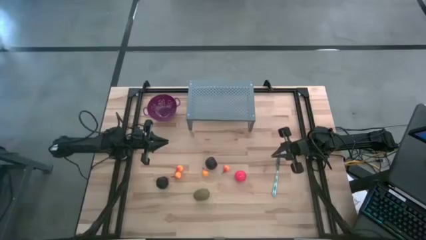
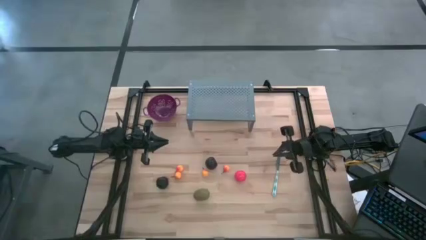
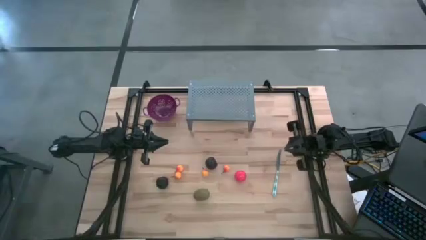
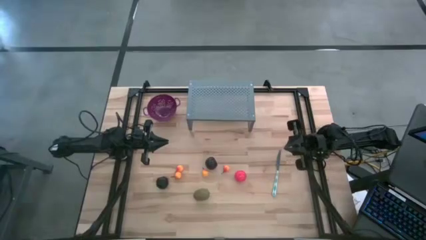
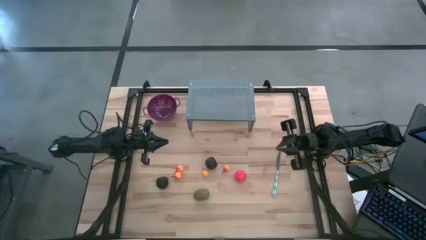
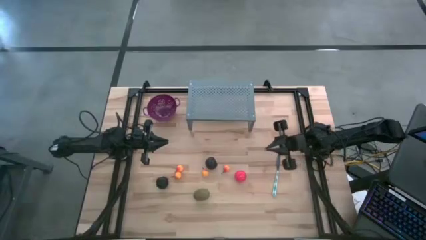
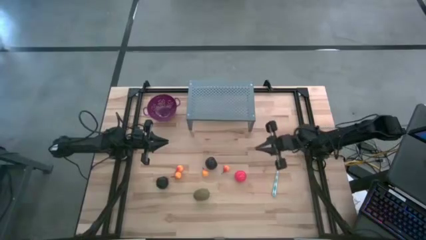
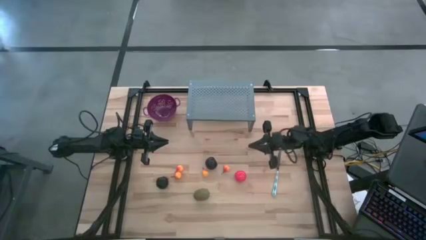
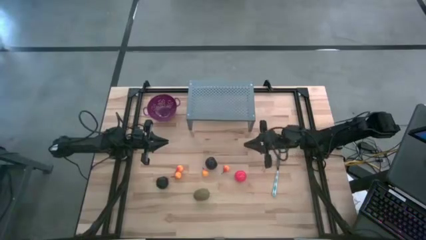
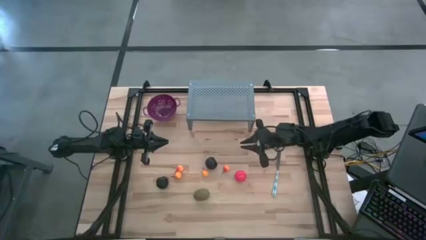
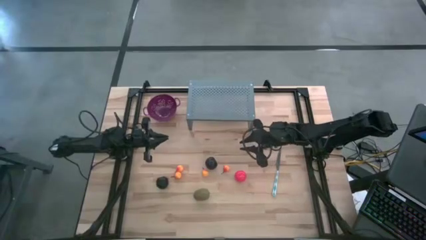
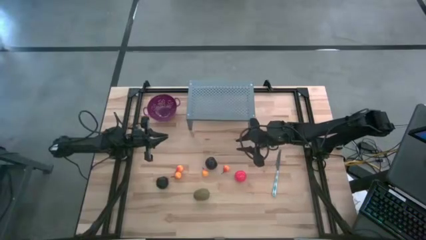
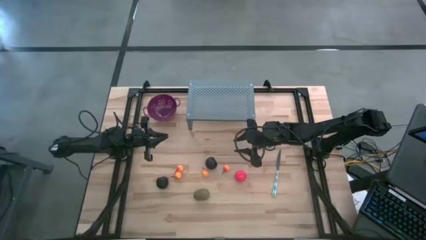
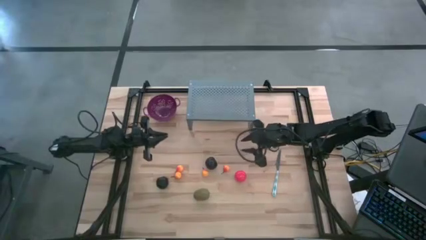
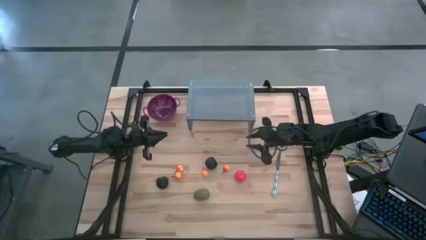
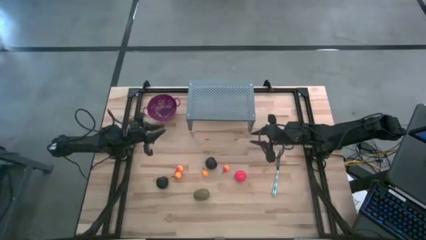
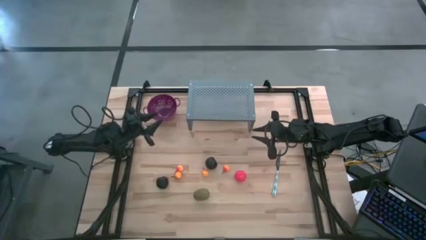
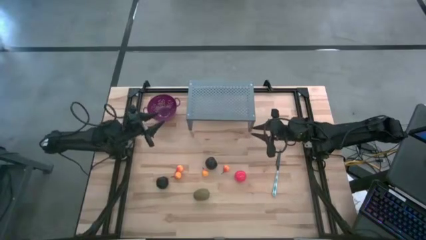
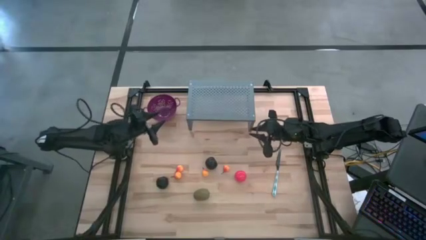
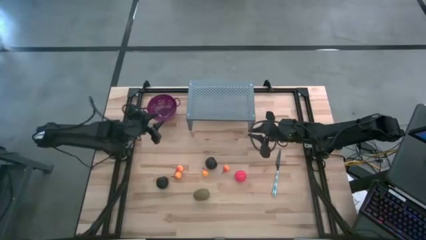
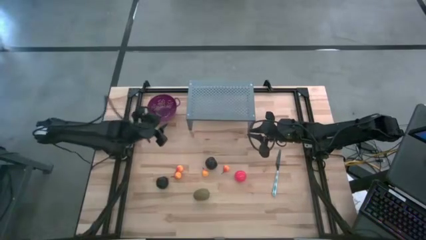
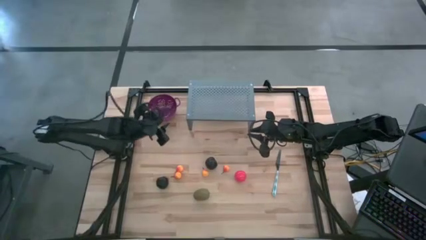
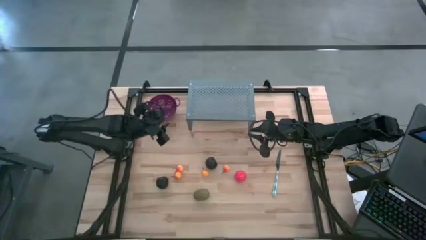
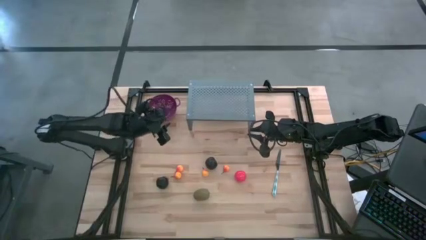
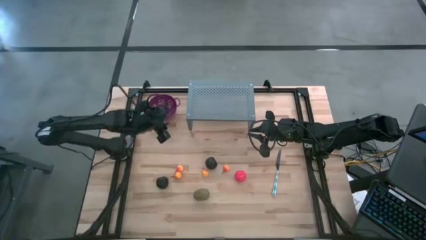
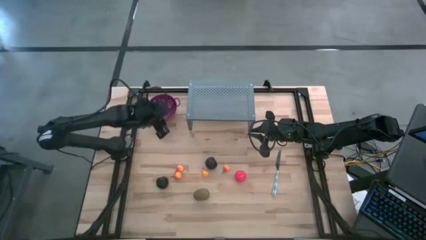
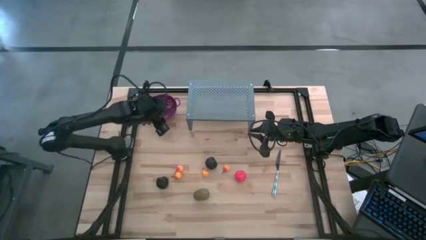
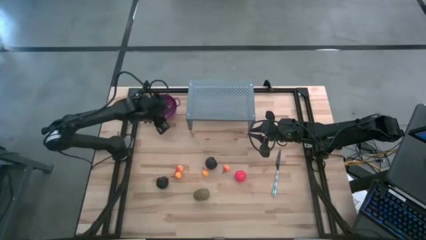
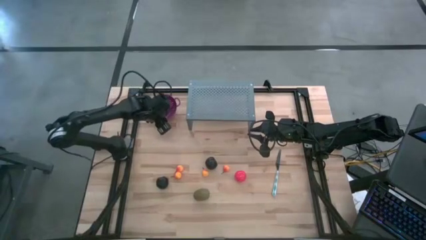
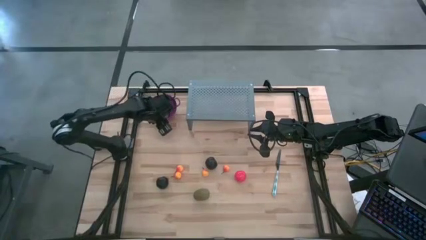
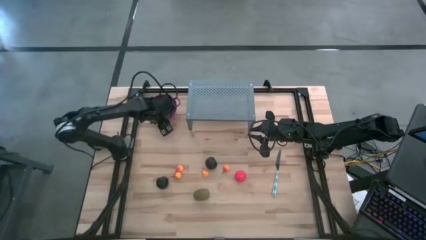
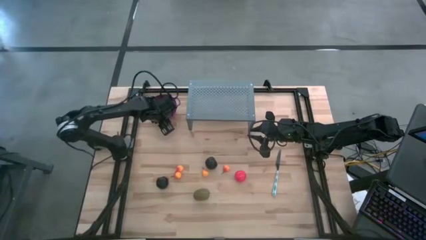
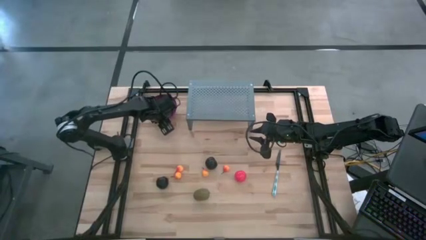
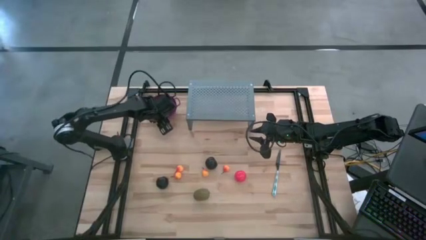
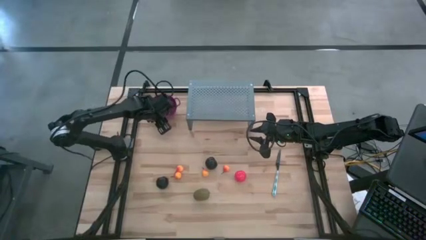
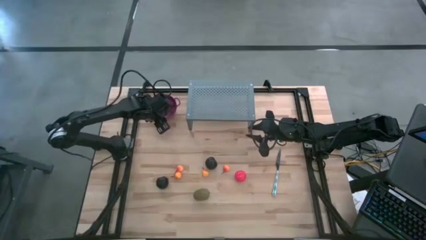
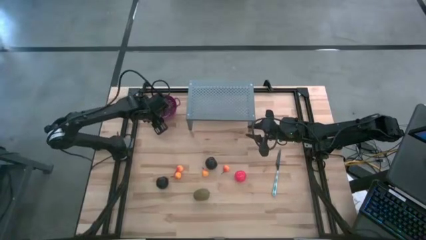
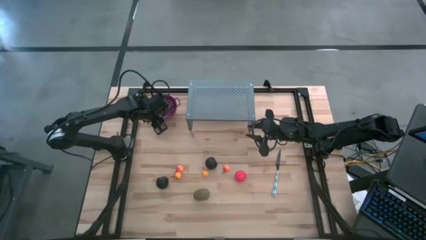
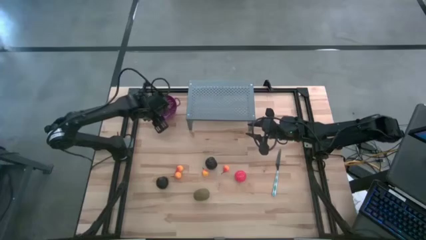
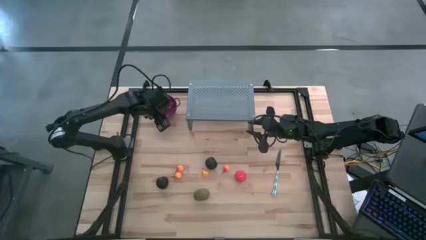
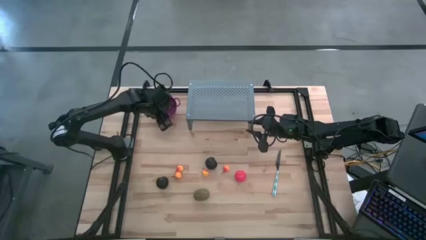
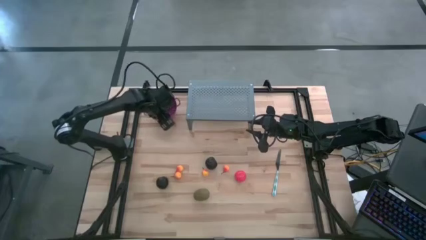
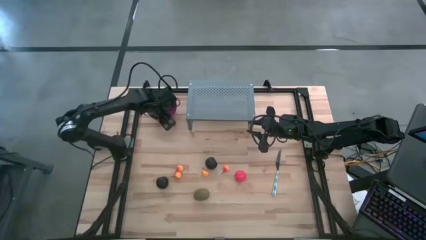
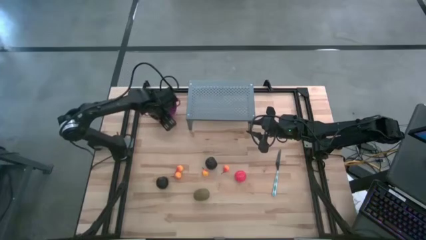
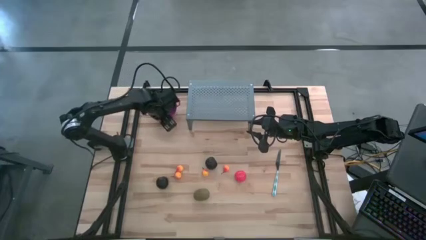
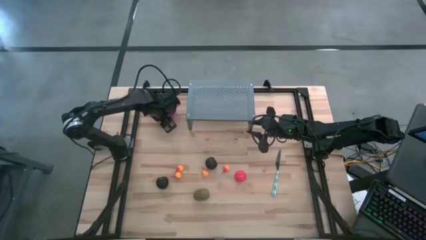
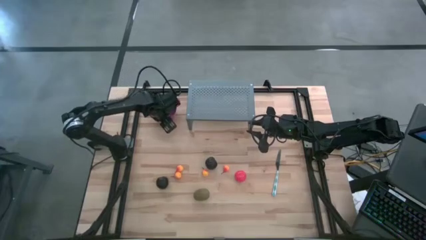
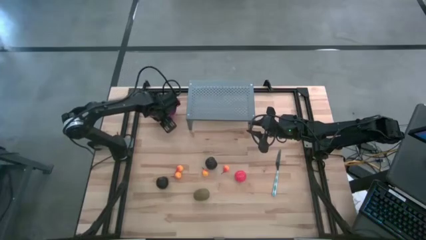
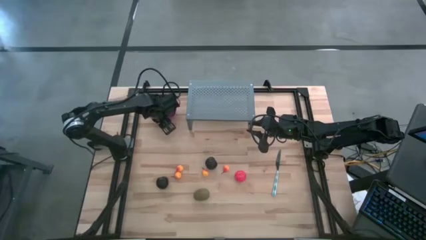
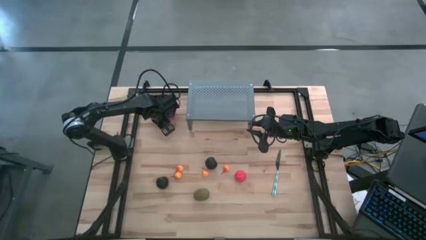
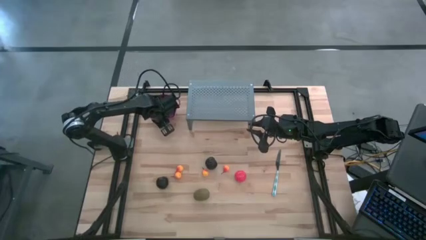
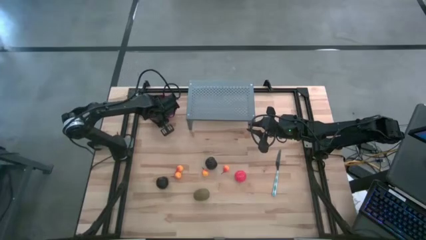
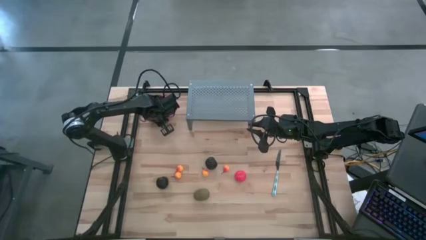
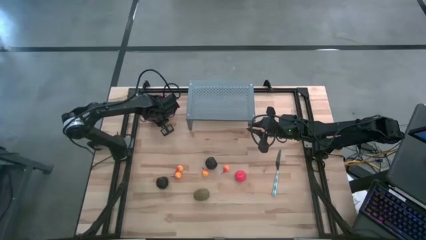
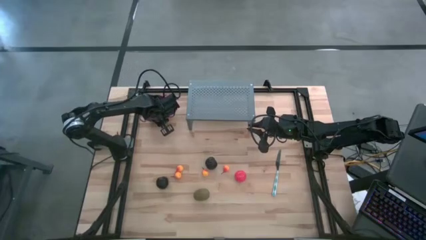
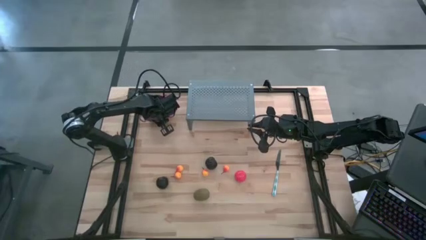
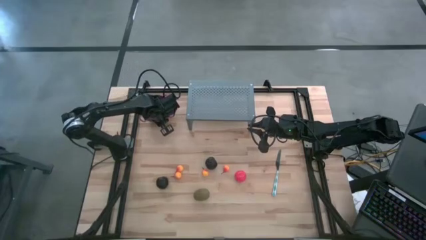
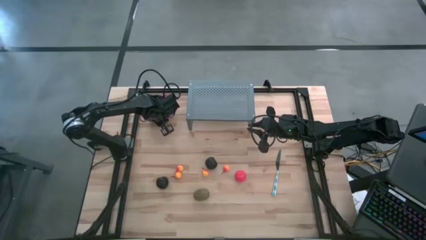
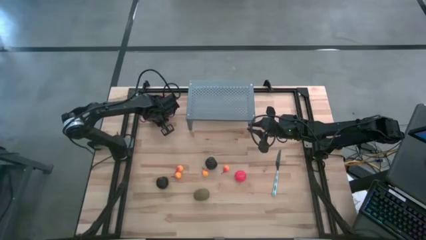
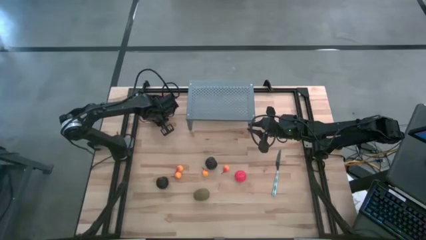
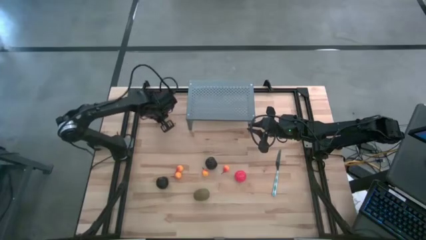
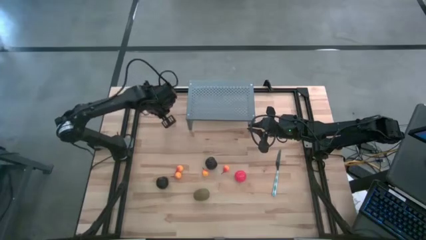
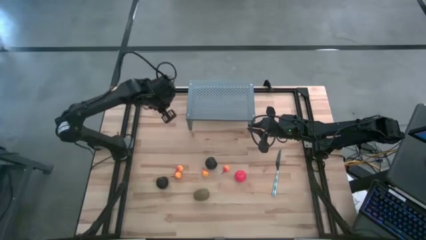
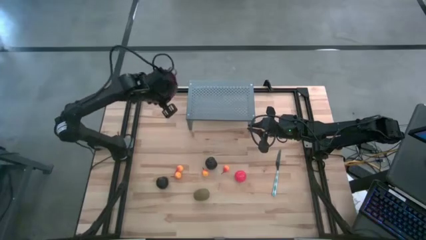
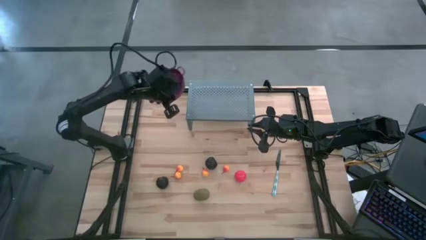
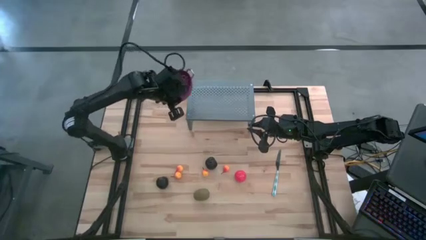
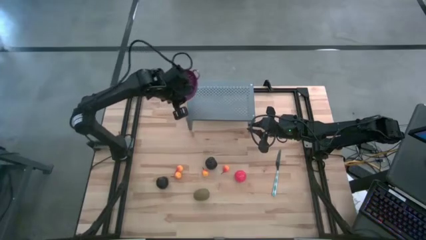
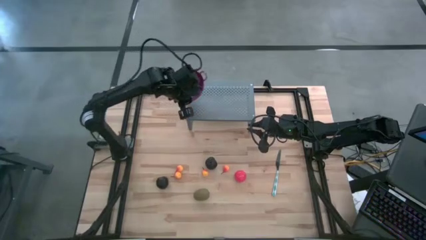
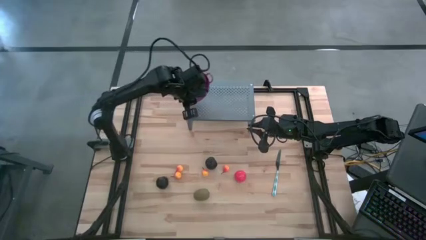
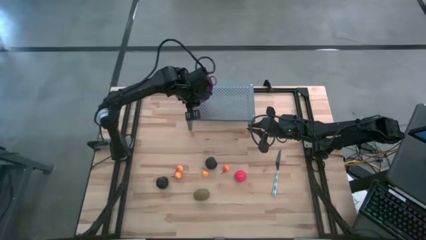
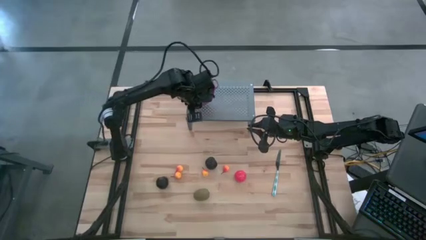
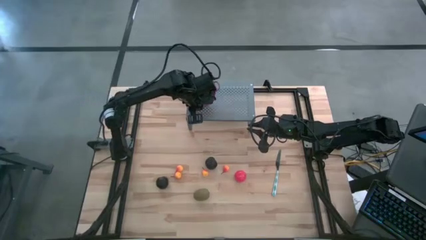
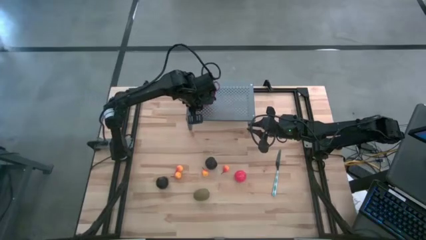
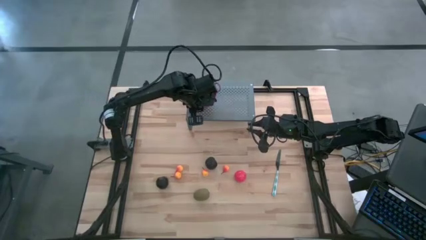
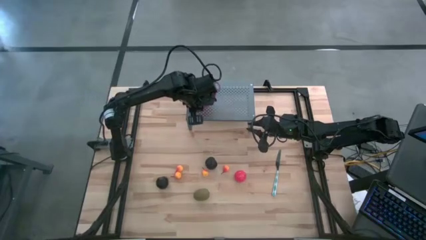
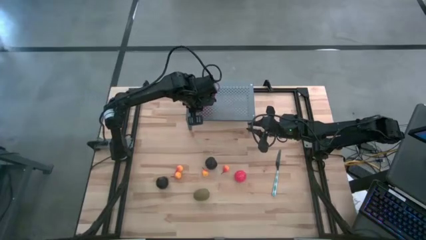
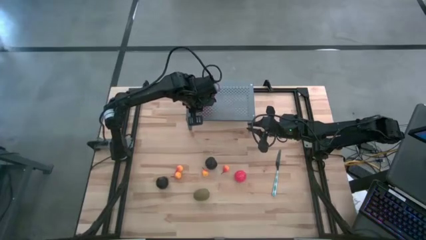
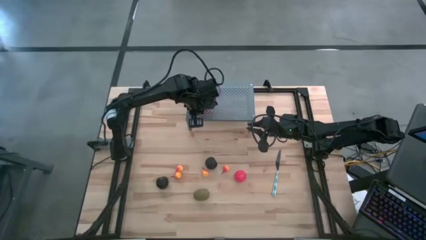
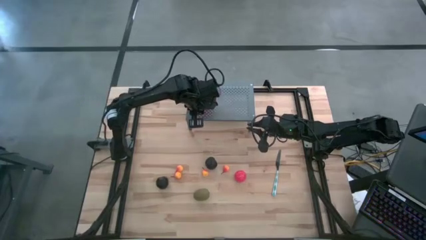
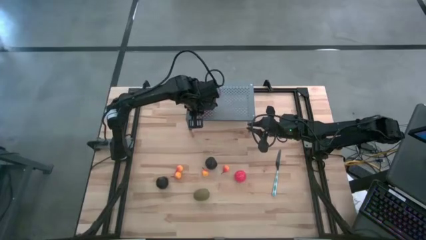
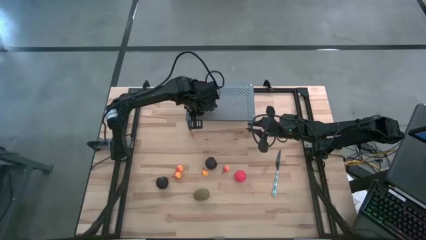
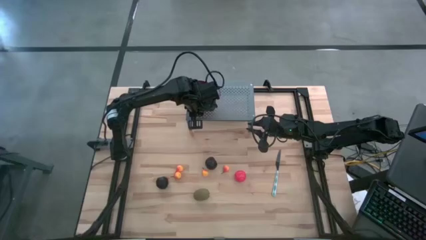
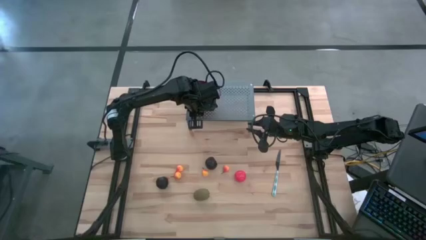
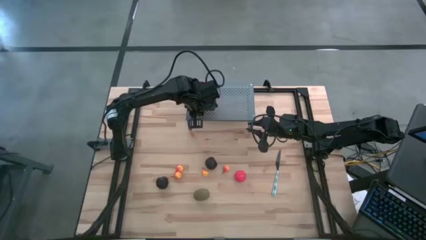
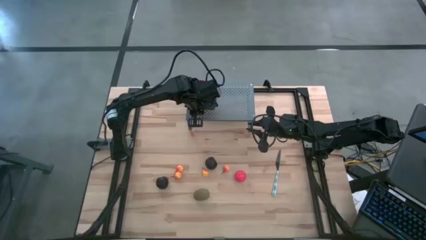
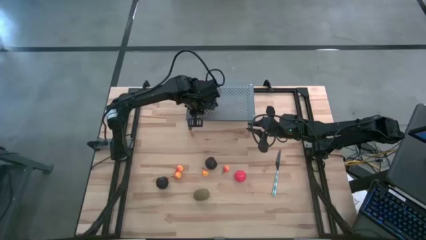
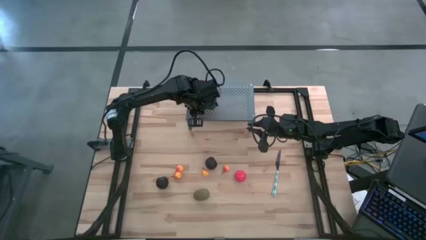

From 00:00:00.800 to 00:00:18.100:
Task: Pick & Place Fruit
Put the purple strainer bowl on the shelf
